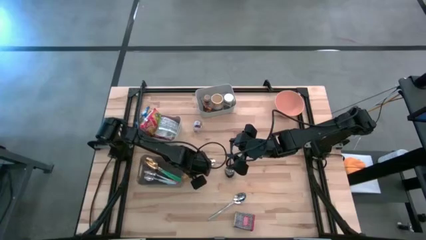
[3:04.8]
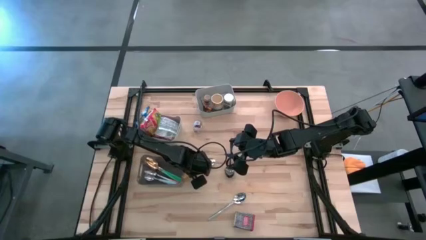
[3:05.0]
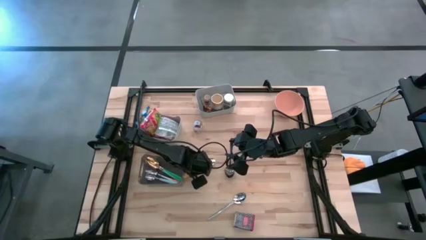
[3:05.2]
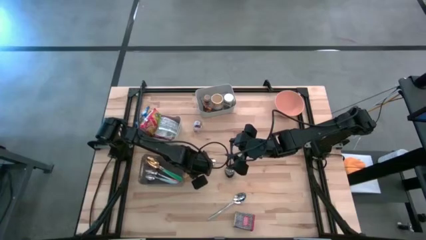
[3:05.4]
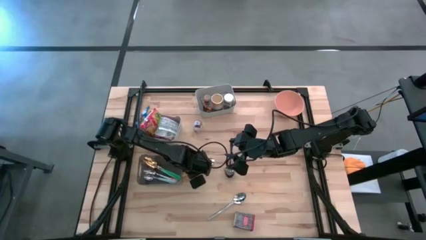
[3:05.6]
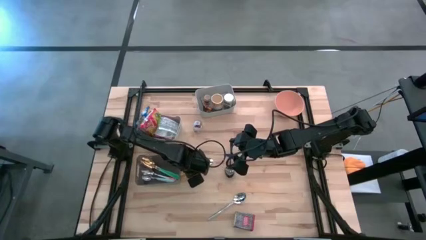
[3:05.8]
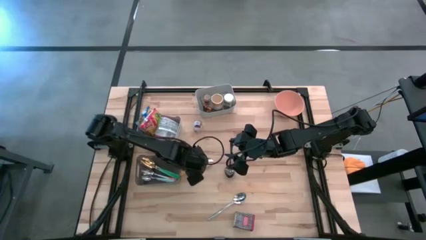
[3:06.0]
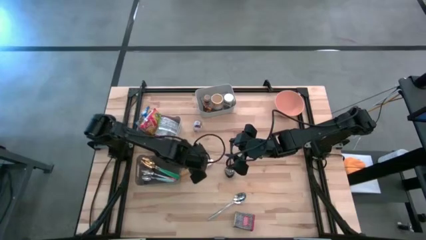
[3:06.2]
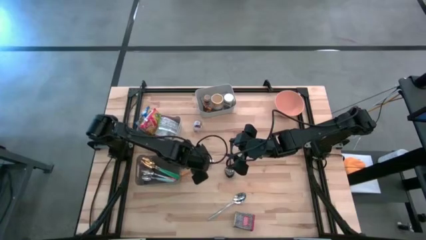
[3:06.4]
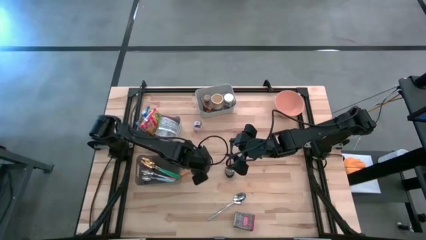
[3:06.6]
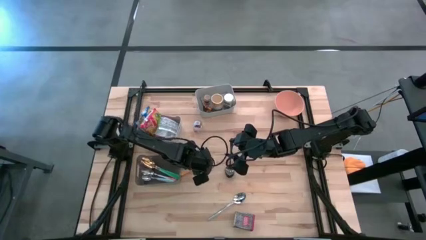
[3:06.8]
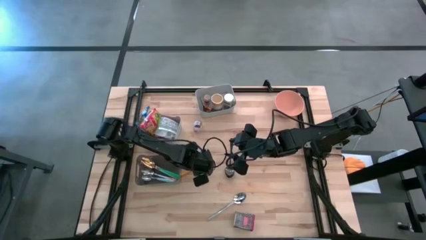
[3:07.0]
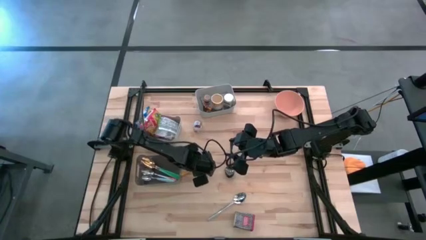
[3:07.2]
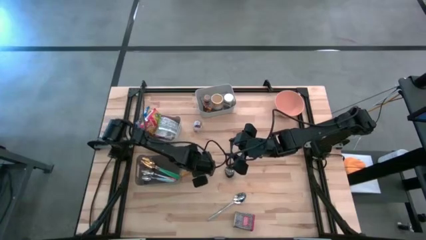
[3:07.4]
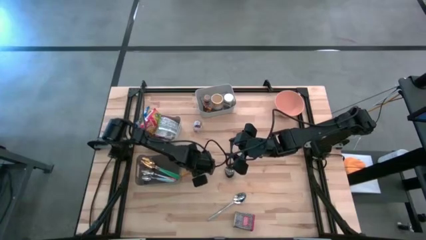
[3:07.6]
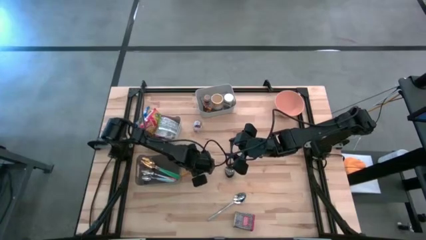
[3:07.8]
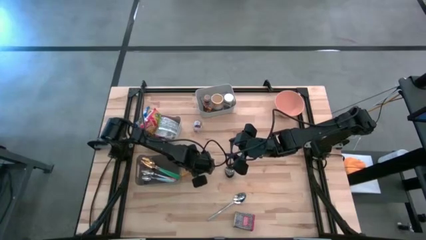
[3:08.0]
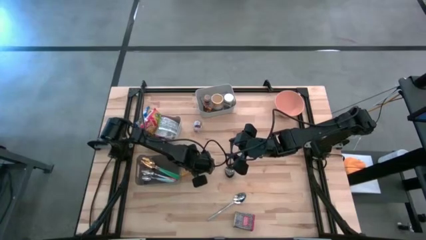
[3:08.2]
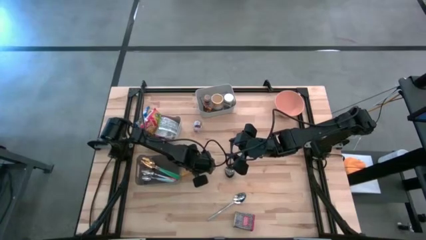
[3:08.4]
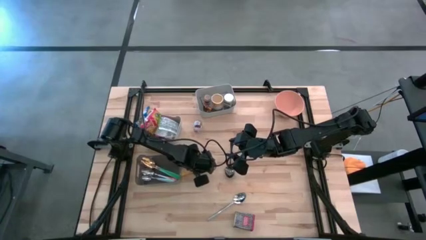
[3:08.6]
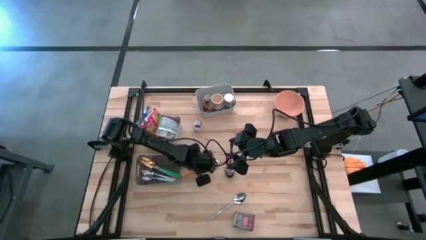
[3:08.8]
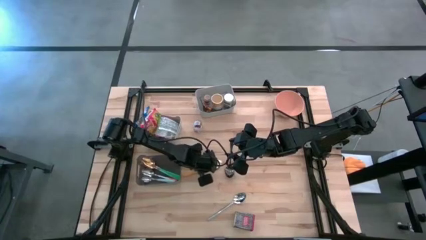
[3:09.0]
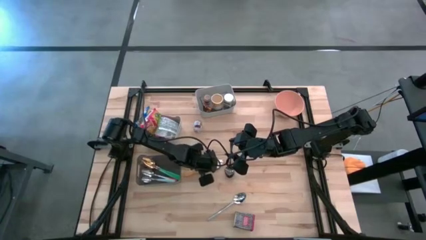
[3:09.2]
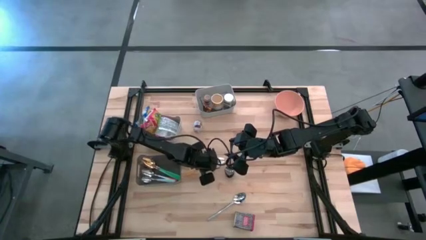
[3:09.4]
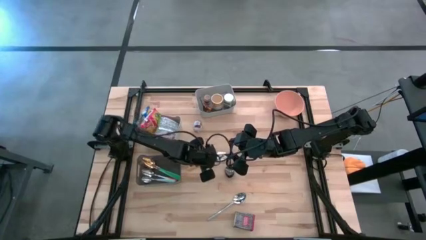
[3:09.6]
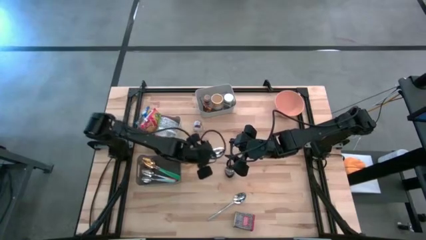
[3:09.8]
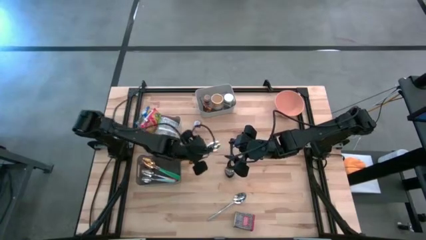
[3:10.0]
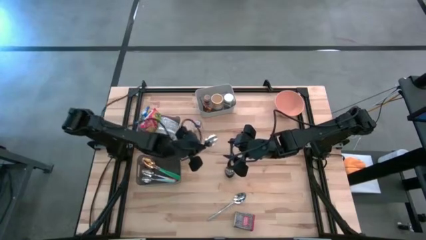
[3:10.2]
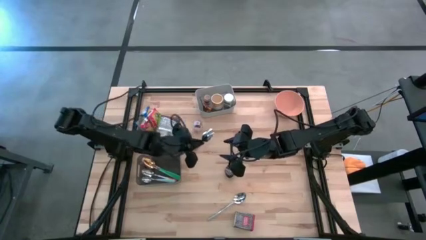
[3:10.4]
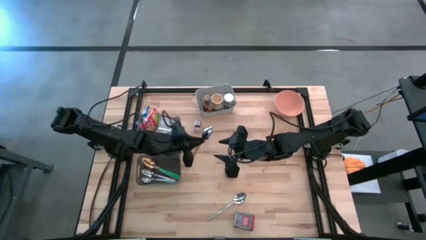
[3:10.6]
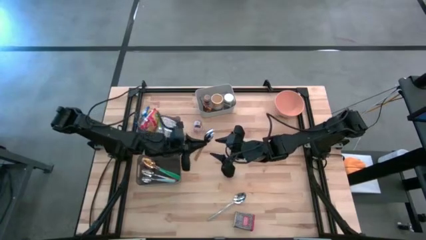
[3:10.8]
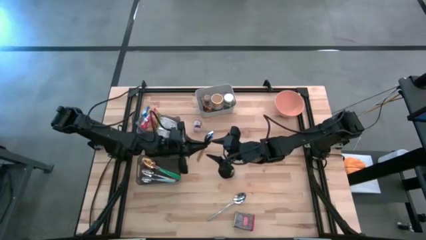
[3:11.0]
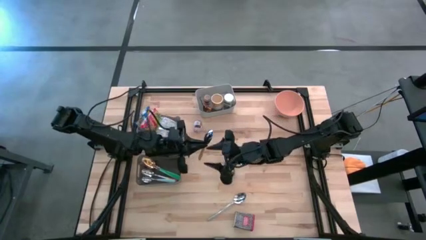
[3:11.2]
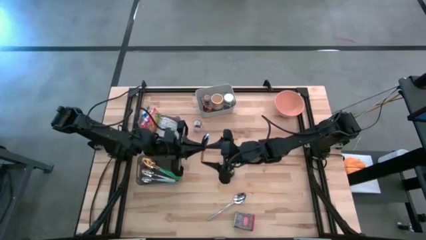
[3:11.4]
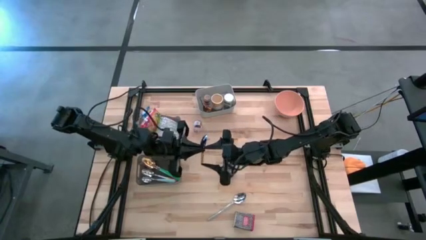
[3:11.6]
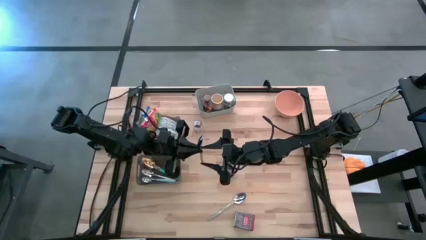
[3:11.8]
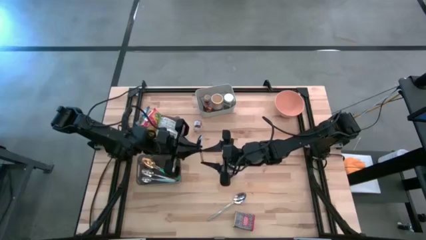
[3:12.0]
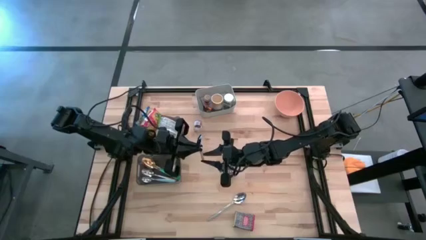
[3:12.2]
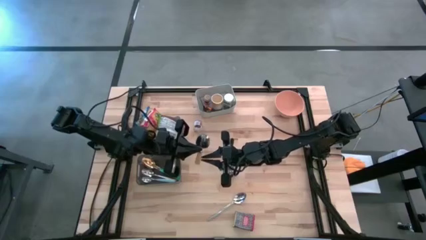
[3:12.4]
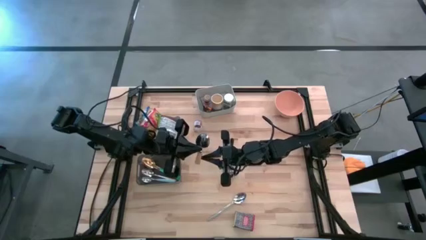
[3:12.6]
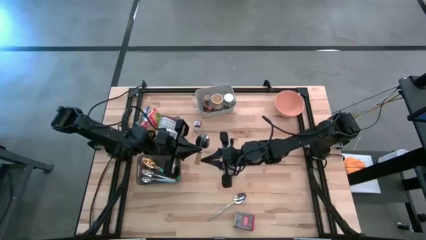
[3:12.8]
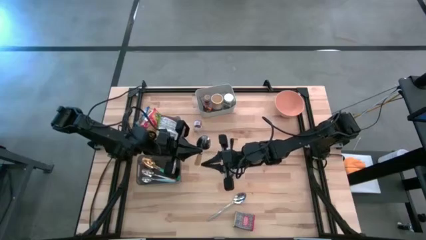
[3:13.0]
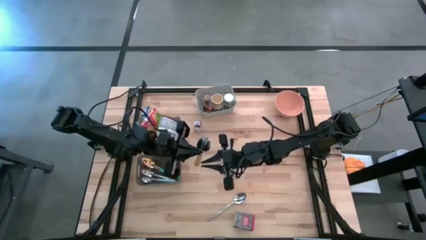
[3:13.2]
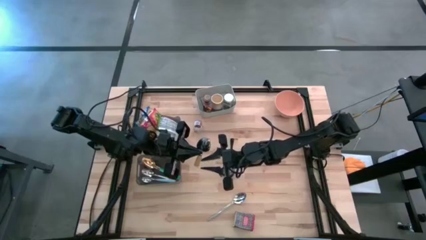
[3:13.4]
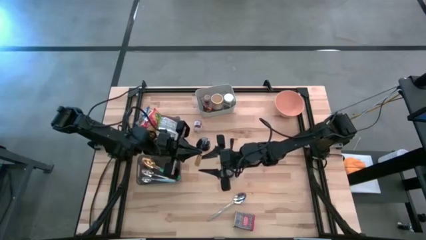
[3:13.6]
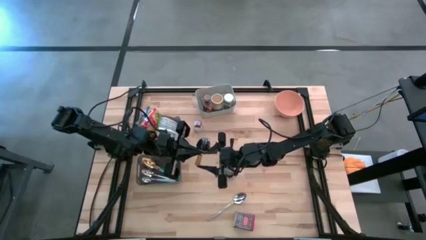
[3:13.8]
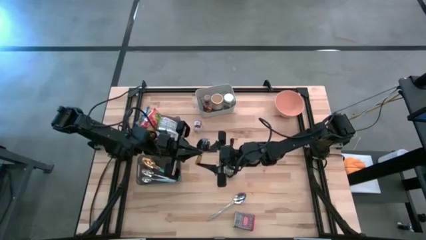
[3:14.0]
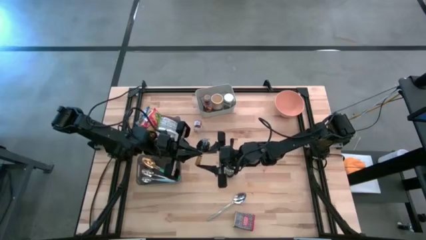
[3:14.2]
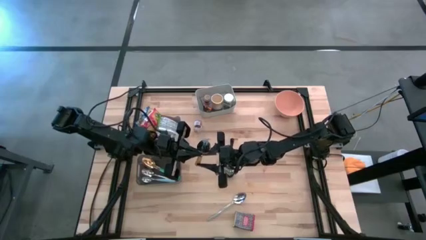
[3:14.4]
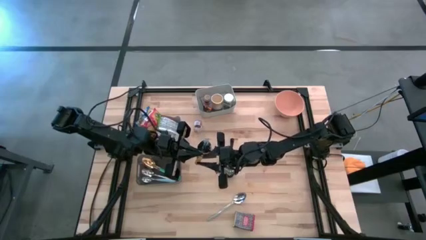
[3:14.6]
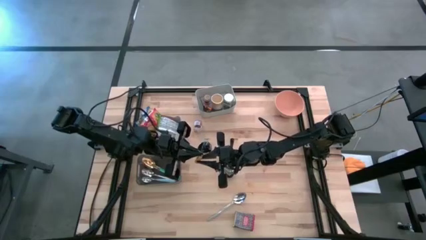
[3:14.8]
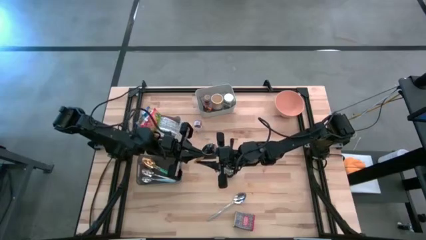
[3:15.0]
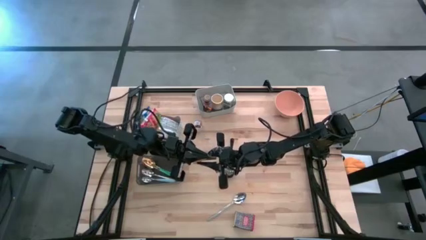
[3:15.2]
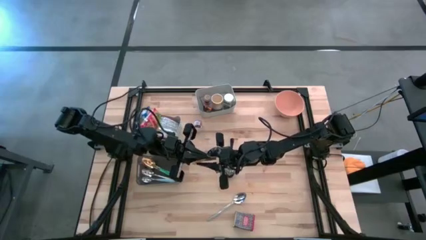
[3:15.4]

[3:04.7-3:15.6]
Put the yellow spoon into the black bin
